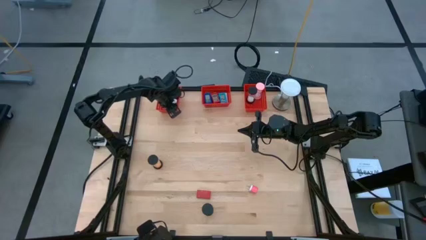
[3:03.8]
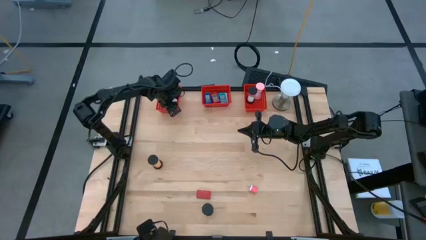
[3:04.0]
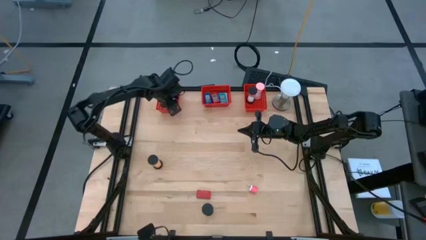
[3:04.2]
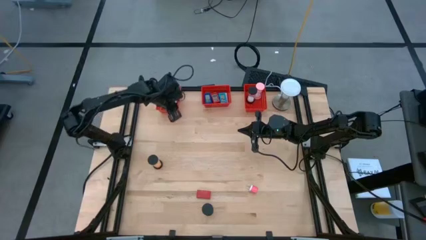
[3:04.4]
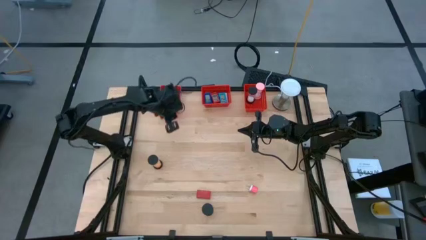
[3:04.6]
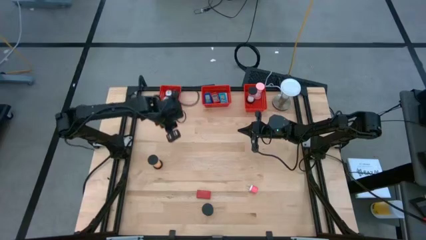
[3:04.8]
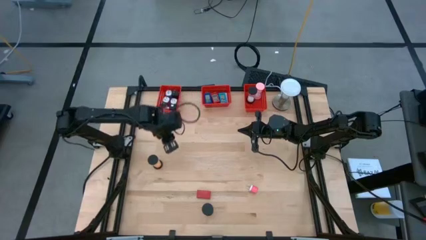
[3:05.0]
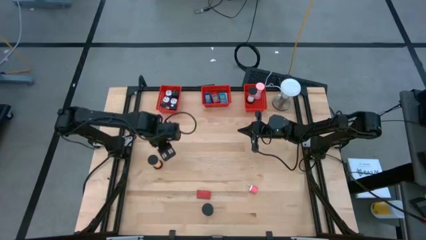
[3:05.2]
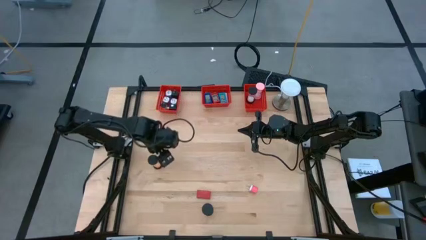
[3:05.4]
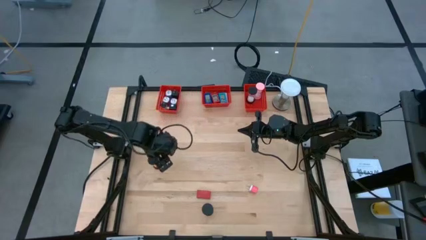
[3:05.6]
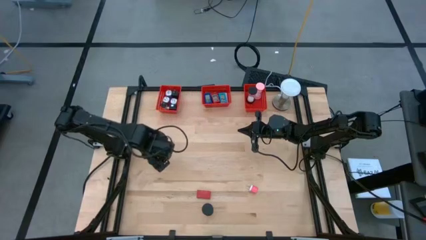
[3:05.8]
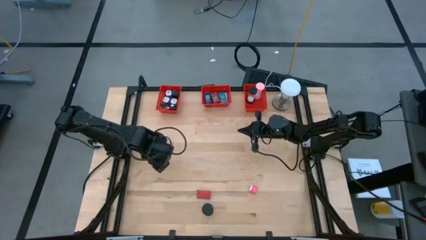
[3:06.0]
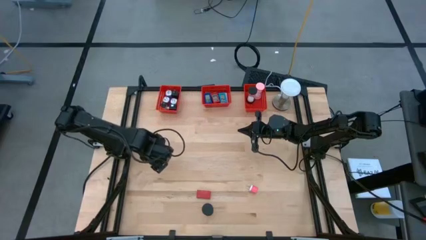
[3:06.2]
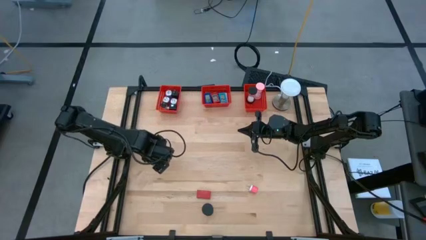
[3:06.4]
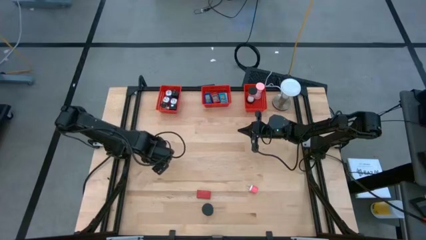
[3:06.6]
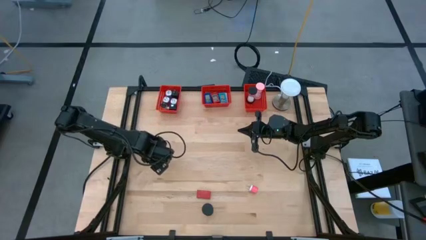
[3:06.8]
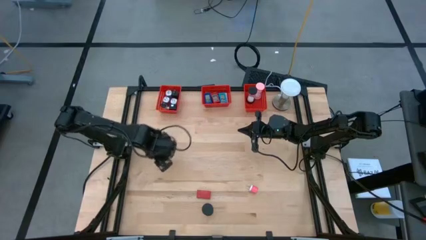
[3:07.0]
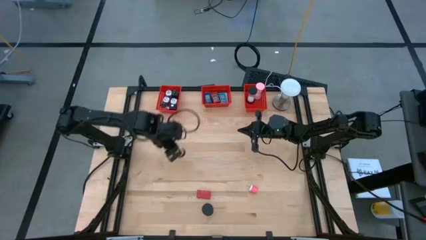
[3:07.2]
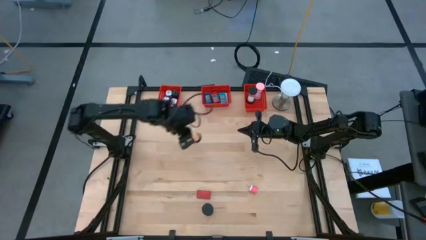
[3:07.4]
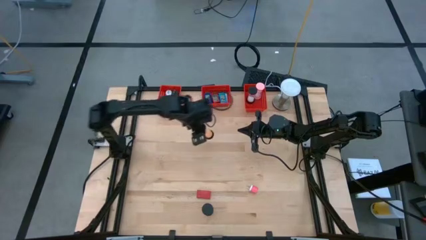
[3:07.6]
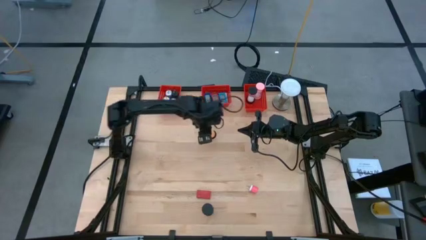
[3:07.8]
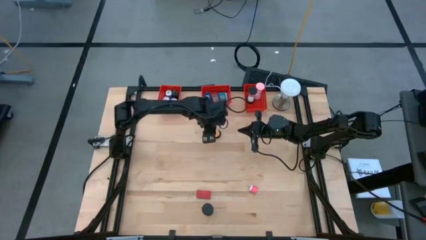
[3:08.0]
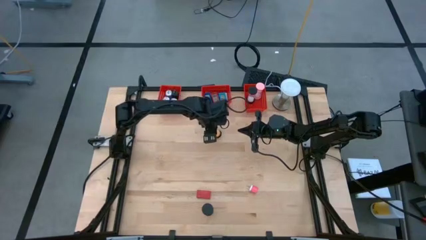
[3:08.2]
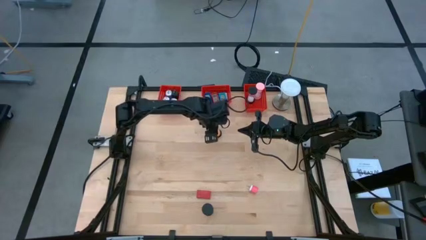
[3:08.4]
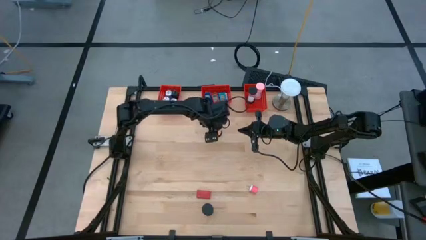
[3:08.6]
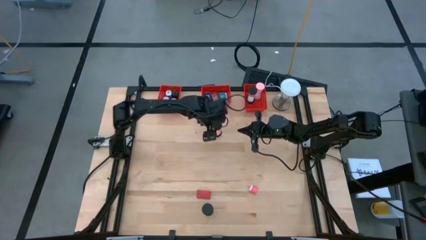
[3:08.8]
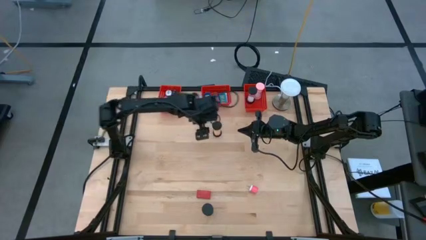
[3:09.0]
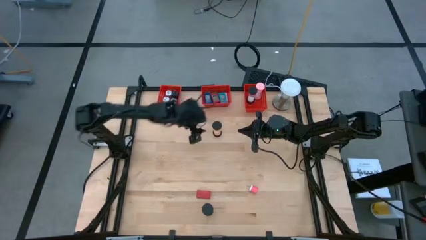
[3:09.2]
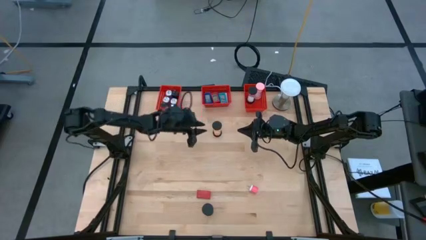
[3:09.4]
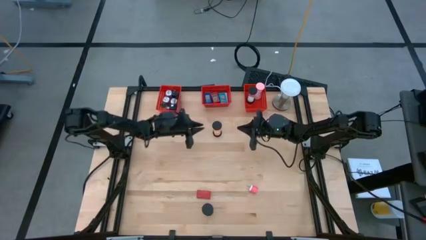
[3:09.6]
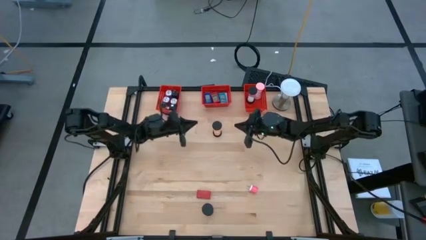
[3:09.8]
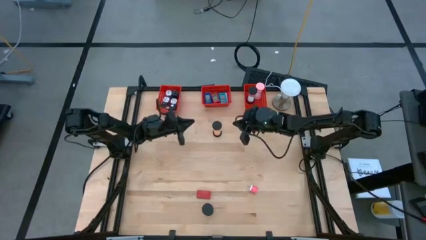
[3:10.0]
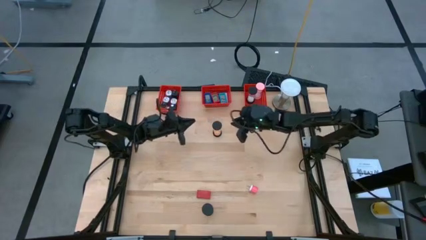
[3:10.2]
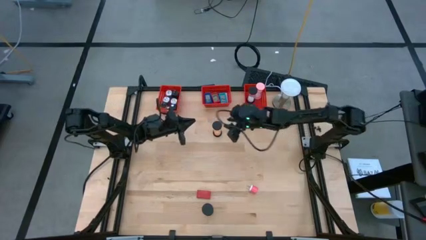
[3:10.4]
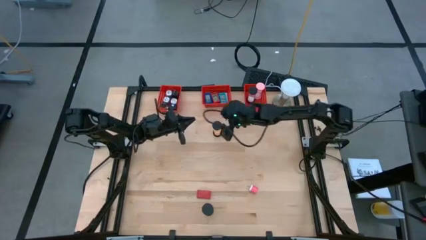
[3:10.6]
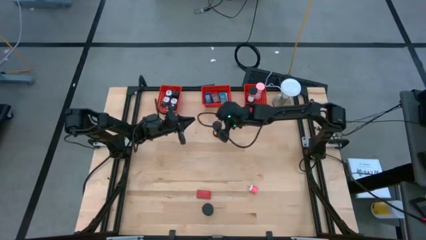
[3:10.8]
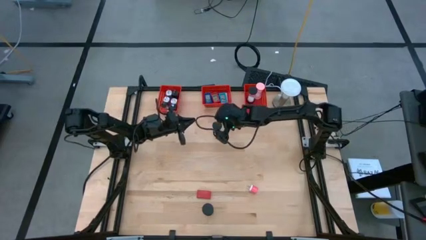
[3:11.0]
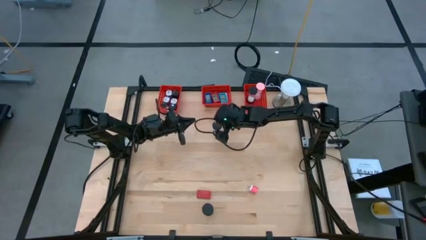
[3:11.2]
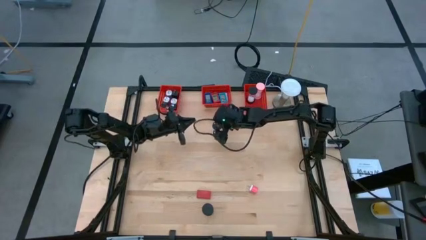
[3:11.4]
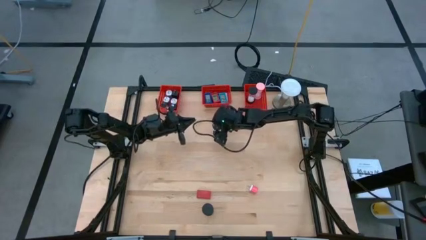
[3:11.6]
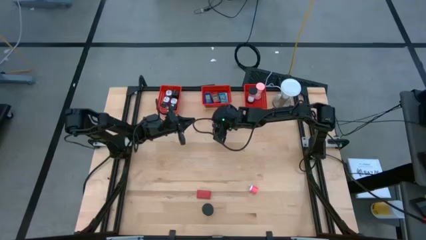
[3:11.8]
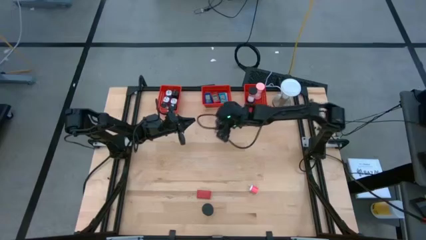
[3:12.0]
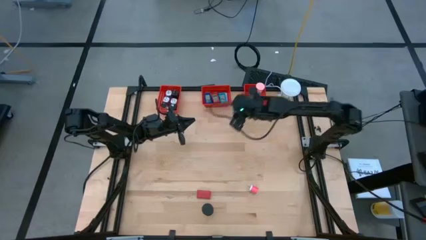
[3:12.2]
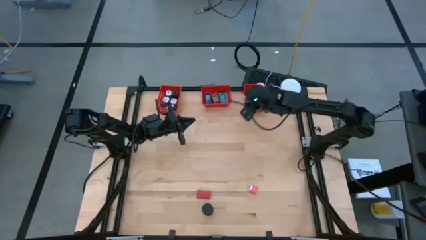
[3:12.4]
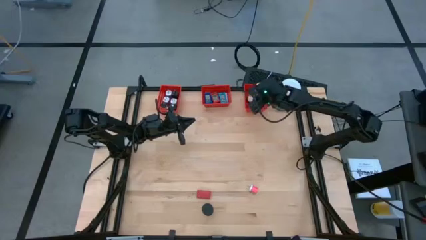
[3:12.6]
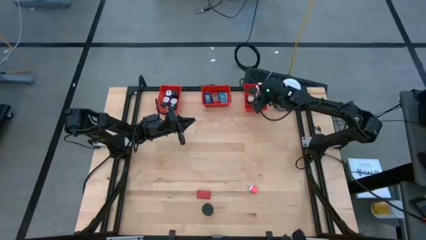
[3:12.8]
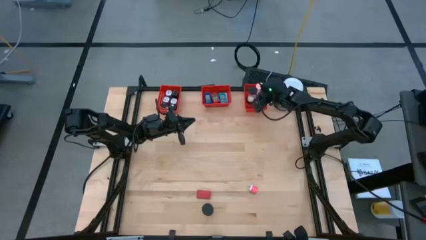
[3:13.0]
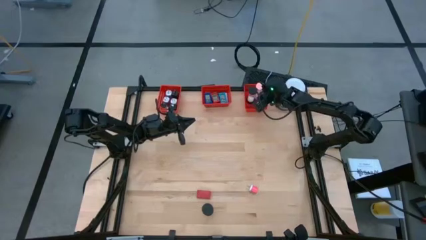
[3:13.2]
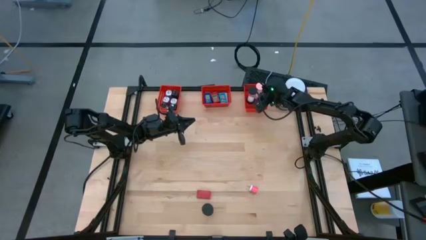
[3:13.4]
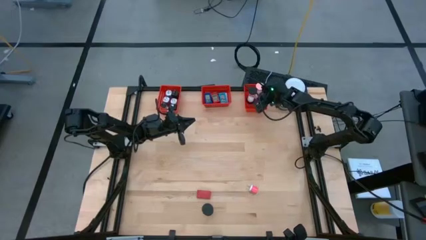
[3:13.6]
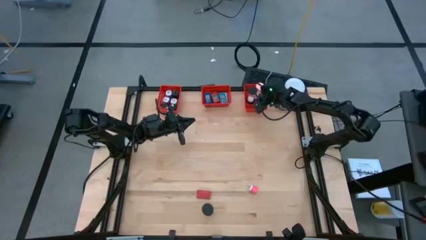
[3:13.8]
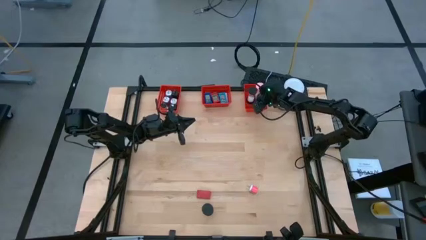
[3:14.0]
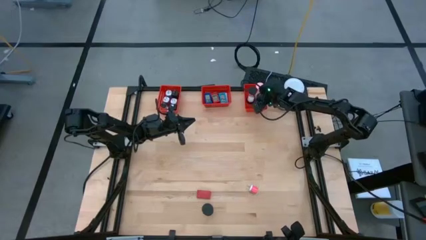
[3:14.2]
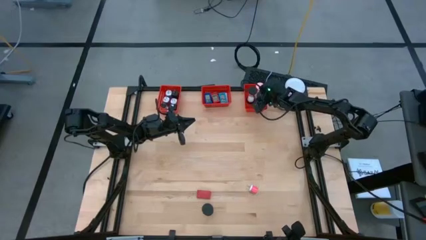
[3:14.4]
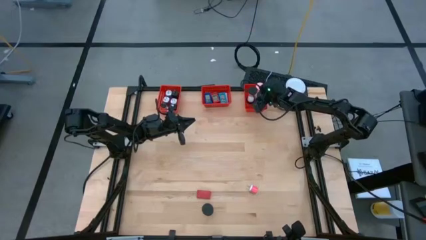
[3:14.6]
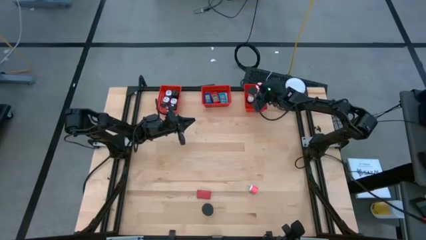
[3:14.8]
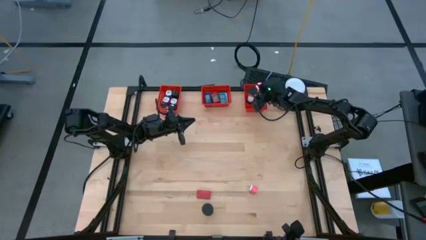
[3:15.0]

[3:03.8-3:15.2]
Task: Pick & Place Office items
Put the orange hour glass into the right red bin

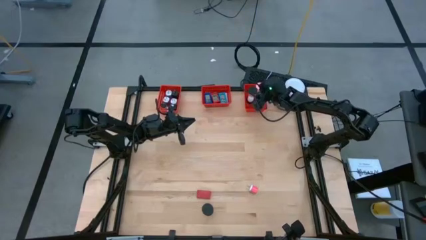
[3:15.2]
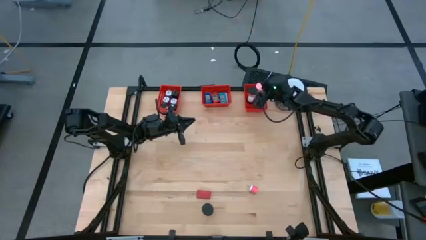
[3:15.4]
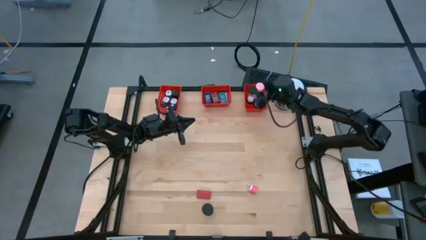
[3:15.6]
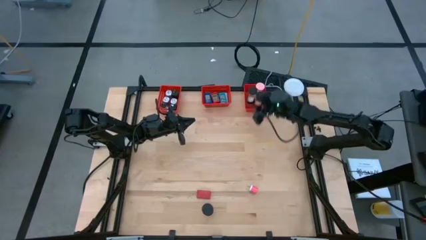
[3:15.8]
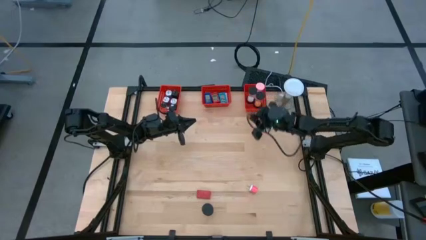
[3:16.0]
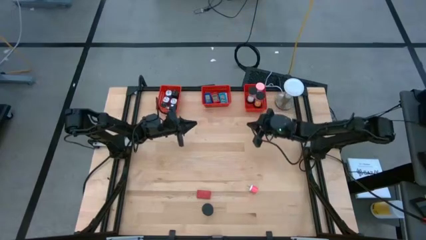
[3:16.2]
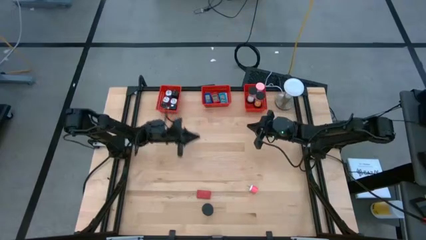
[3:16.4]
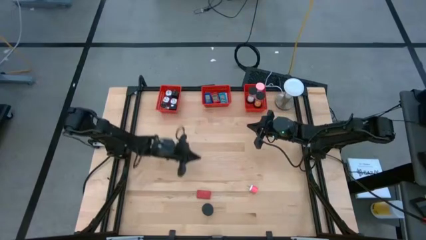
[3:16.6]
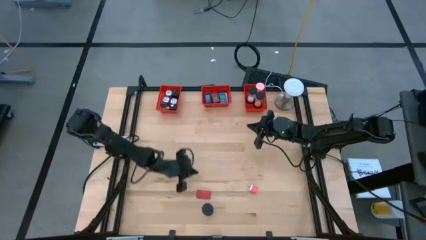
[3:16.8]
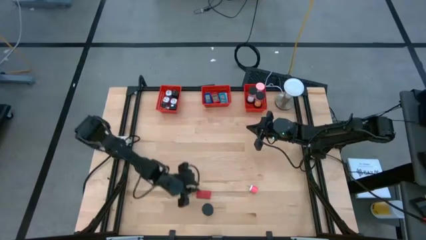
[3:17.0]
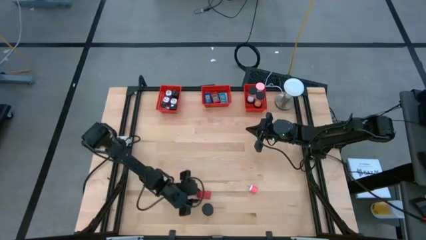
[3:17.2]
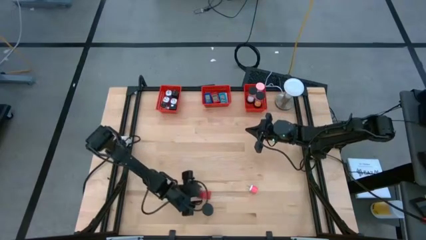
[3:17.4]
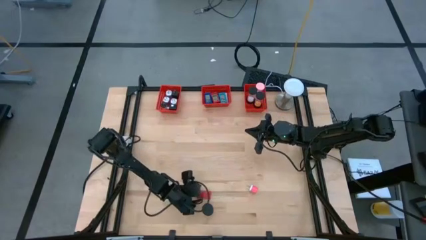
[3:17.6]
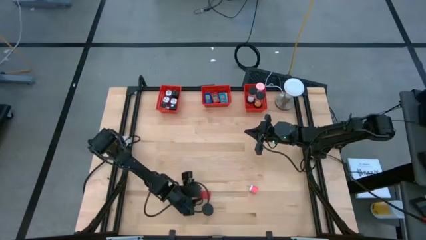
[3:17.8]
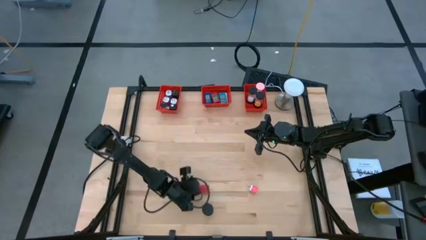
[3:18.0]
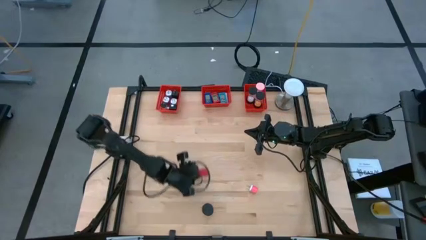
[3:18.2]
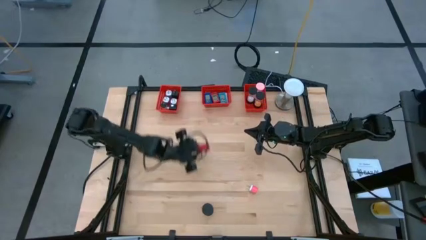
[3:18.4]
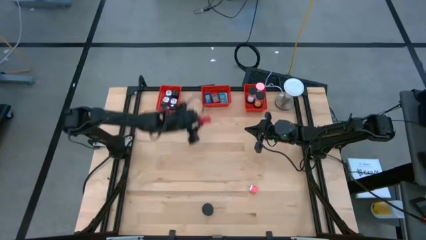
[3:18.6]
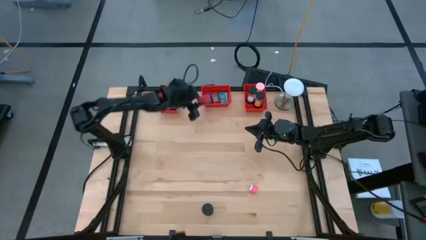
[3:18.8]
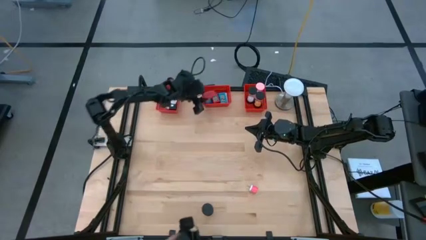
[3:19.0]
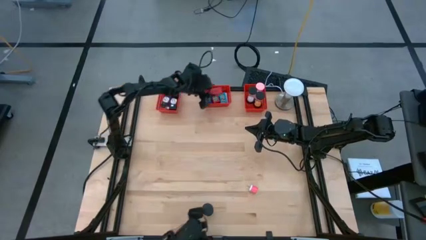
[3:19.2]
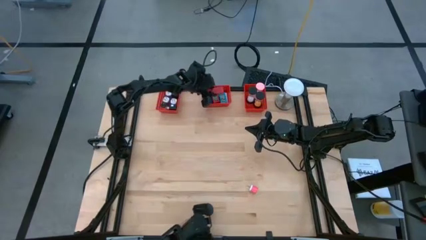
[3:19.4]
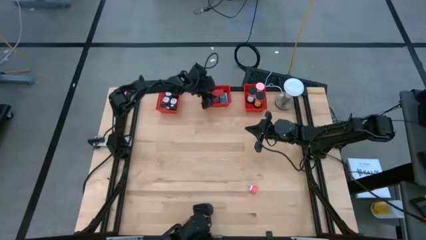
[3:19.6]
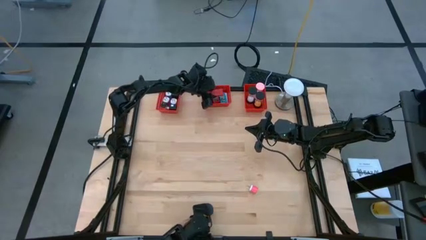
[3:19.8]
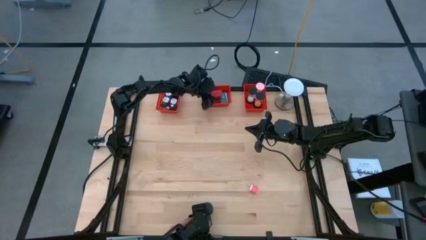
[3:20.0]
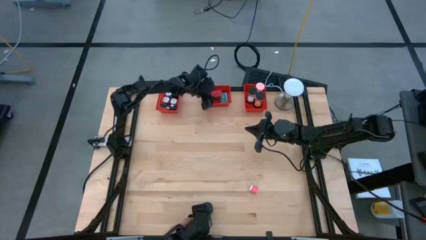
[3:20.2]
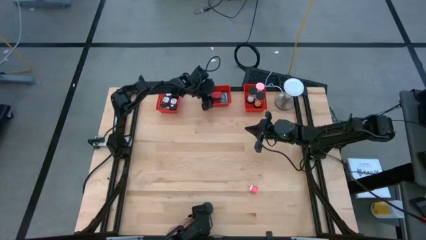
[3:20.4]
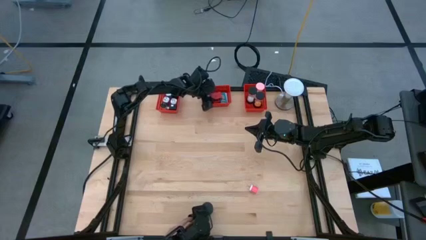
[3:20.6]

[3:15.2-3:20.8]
Put the red digital clock into the middle red bin
